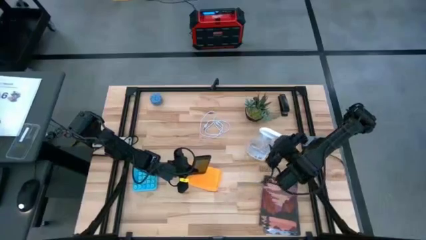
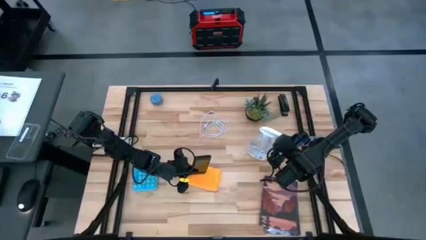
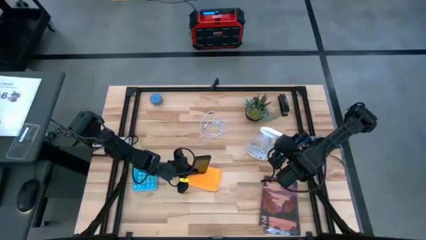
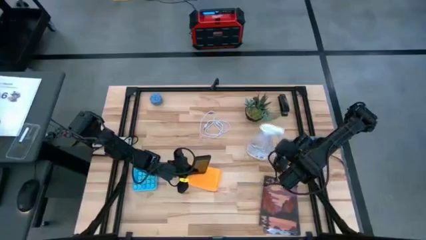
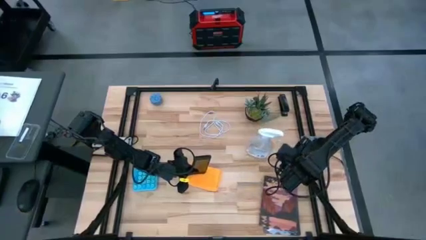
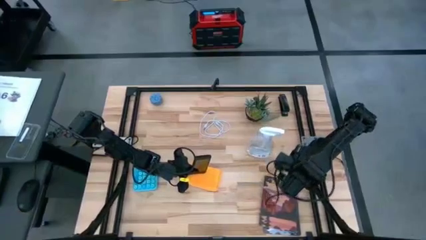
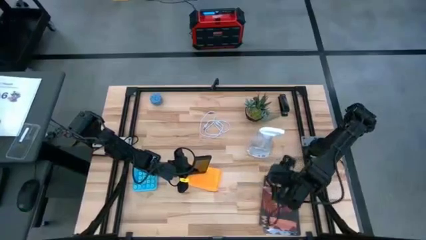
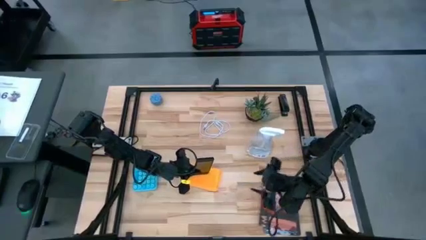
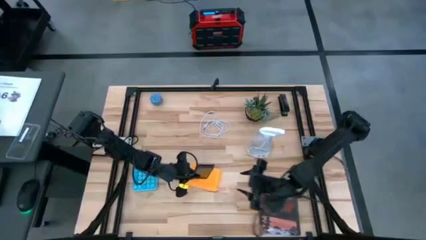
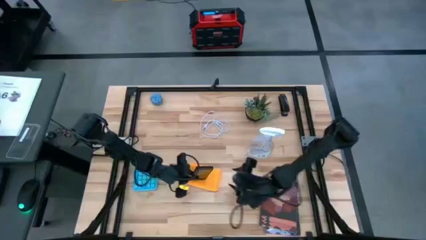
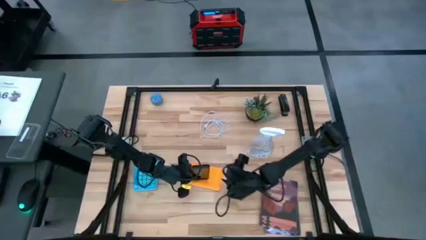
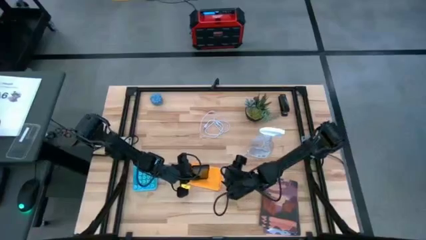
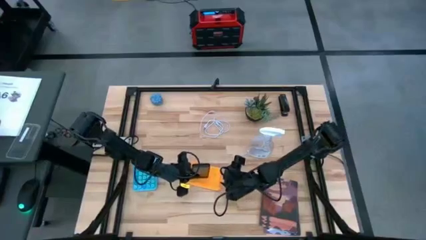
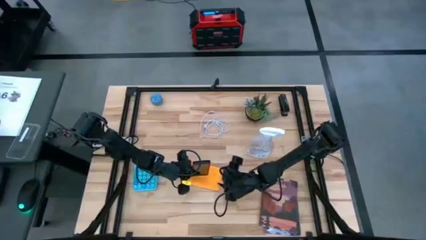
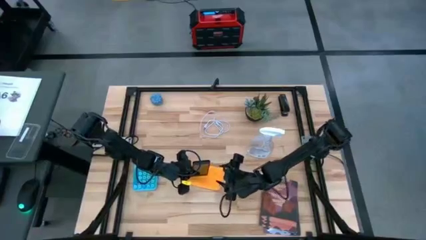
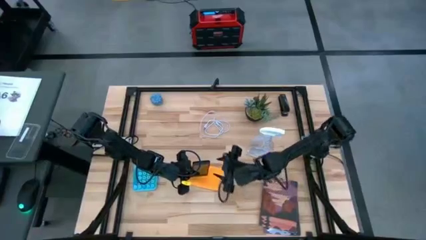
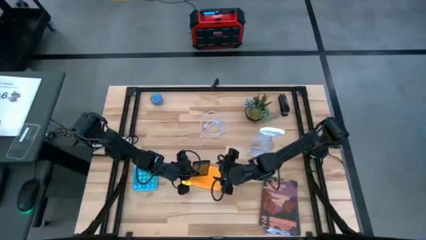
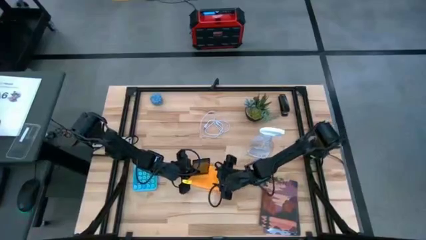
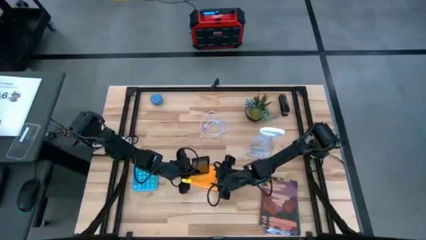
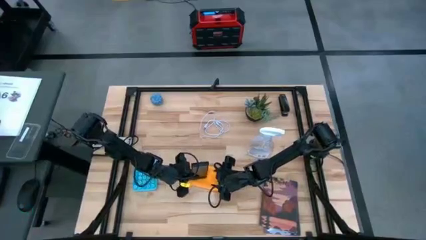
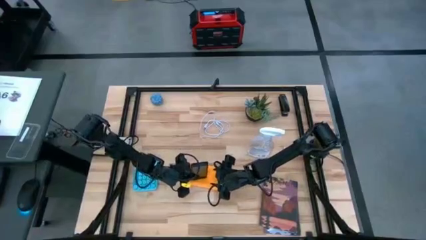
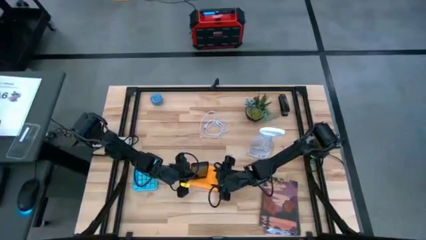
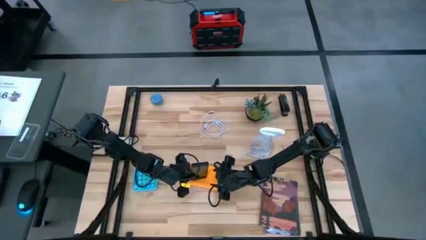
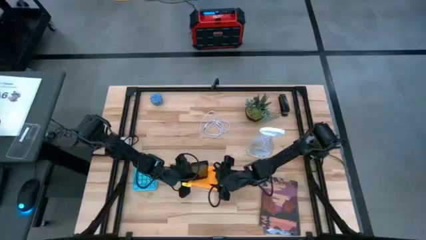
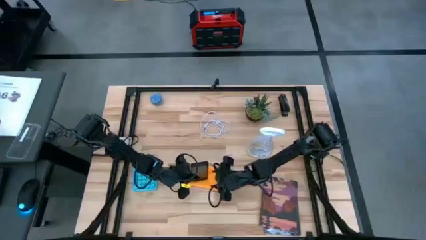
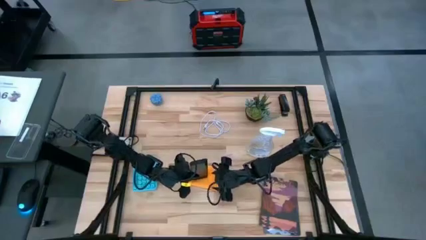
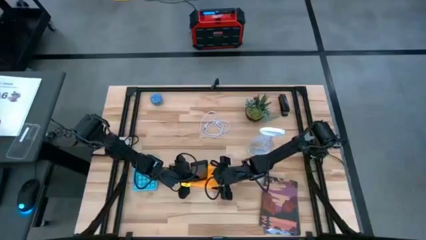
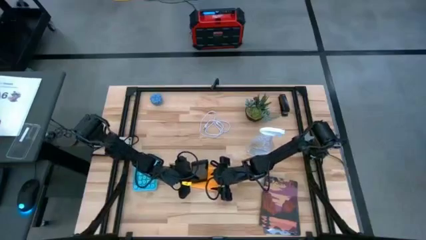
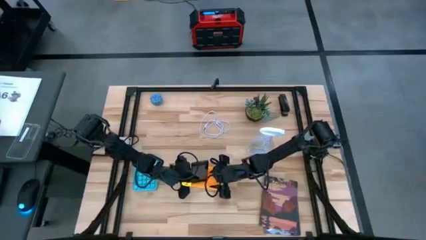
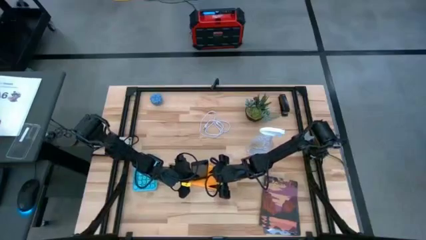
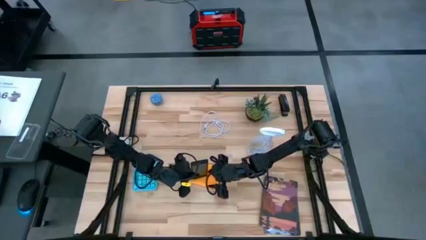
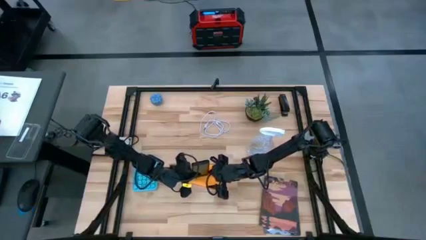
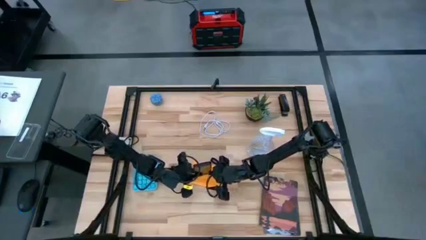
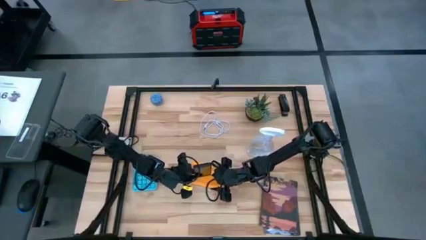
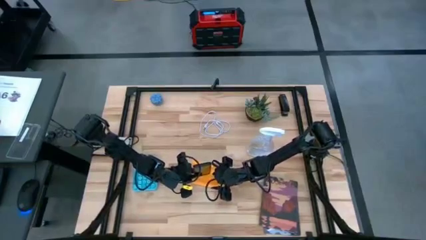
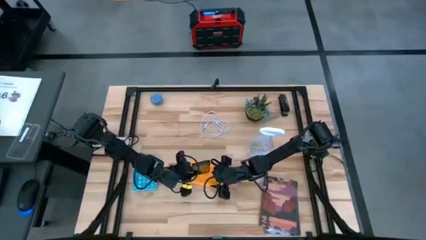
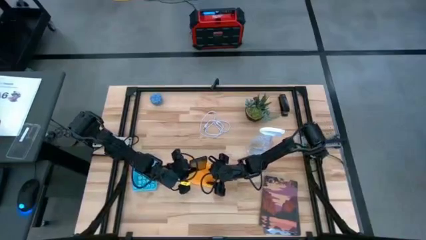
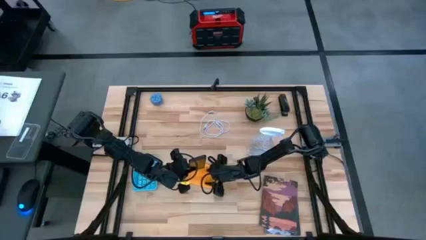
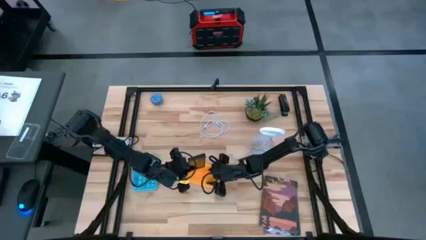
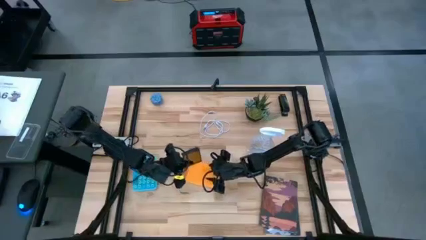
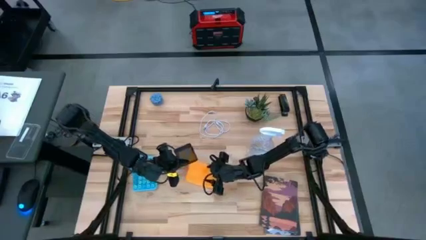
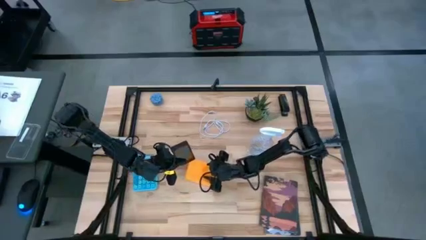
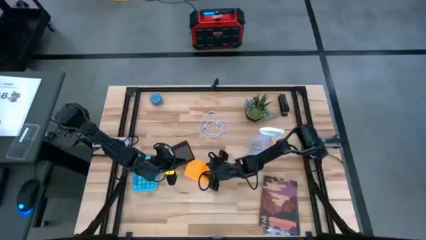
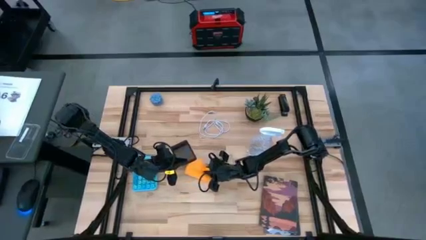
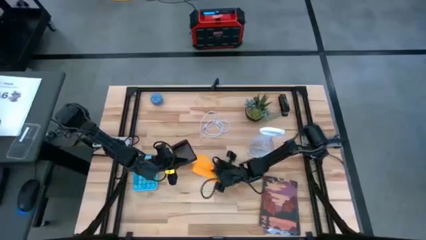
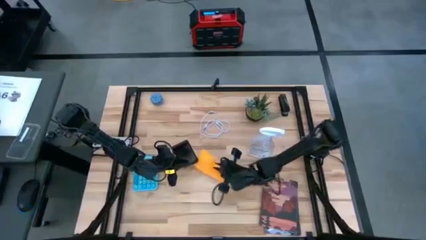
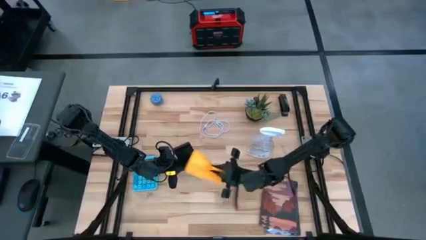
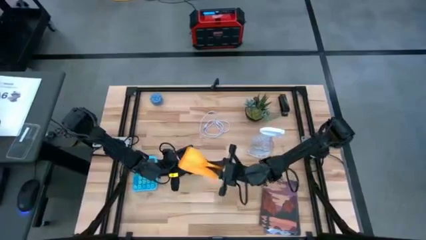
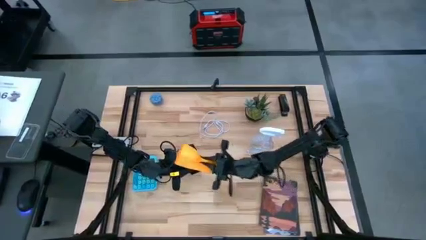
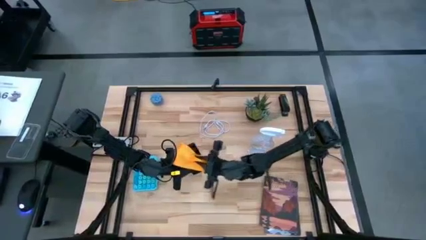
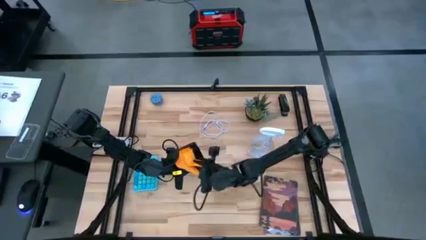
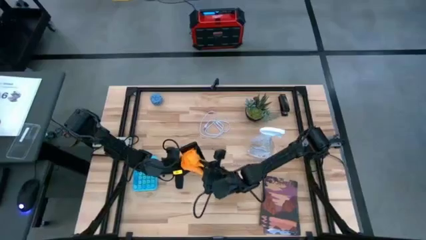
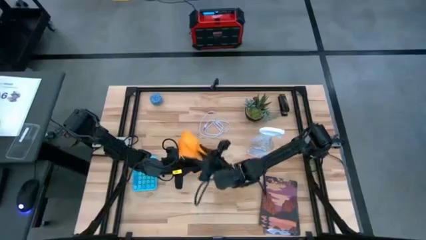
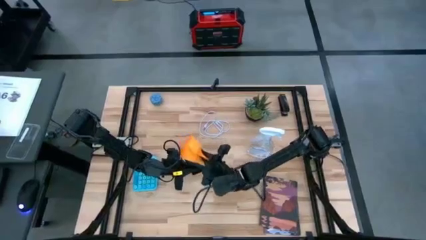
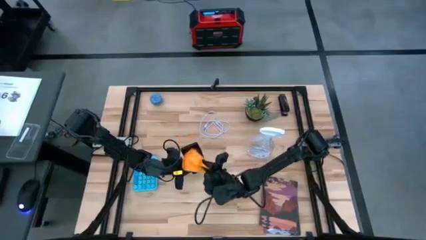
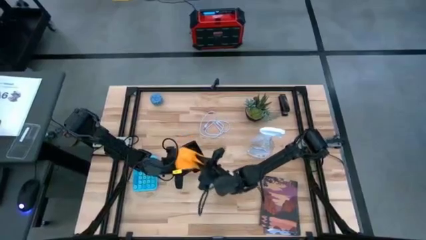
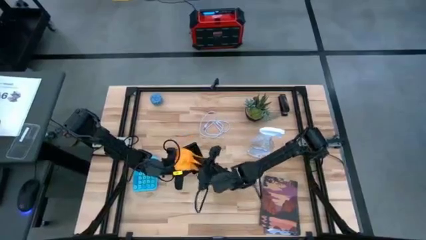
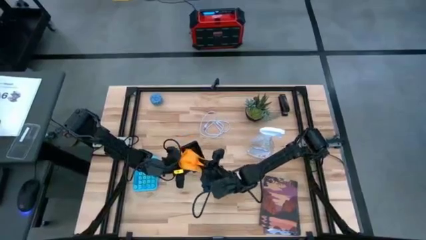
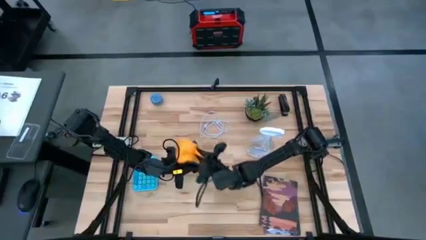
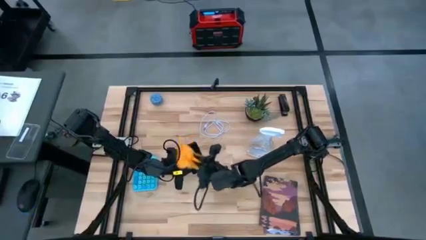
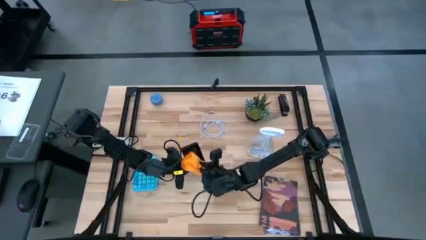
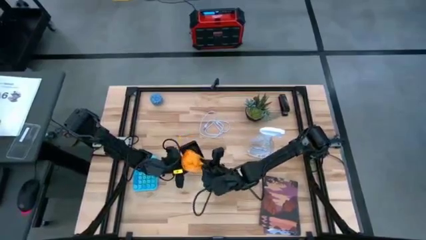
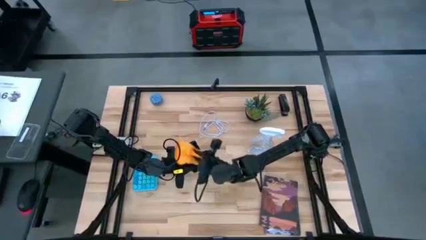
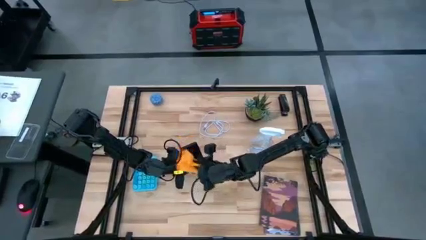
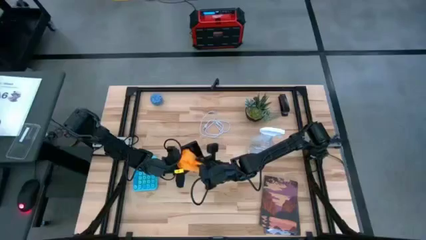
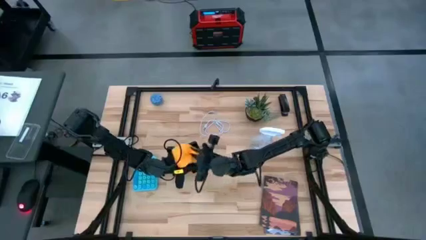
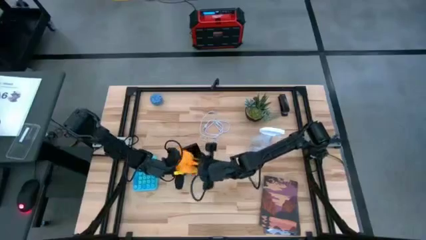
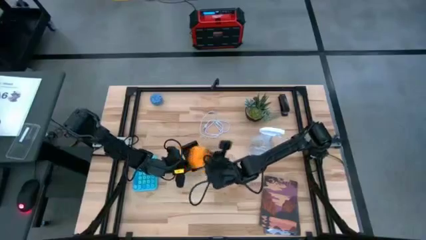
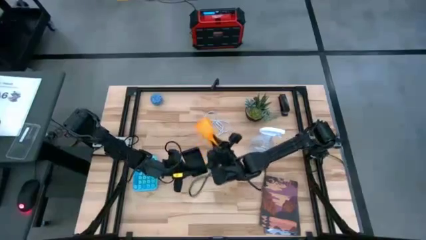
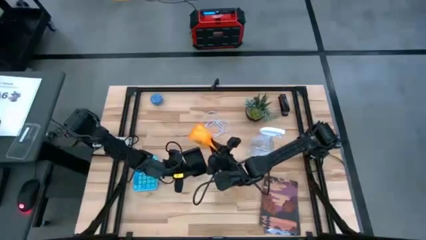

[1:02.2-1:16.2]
Task: Apply microfiber cloth
Wipe the black cellphone using microfiber cloth

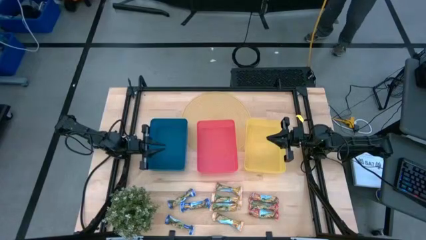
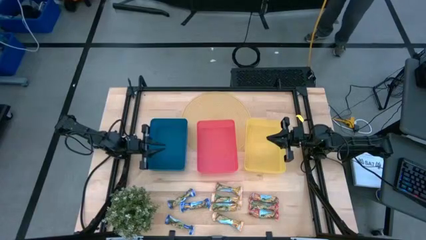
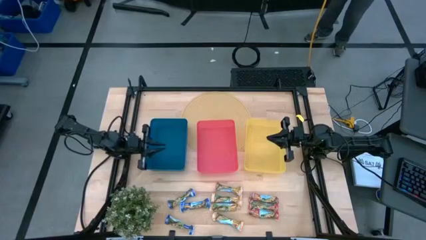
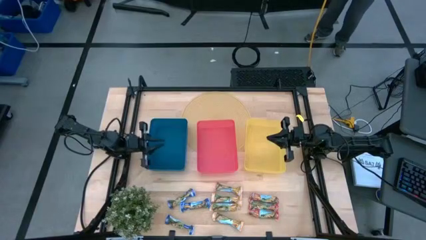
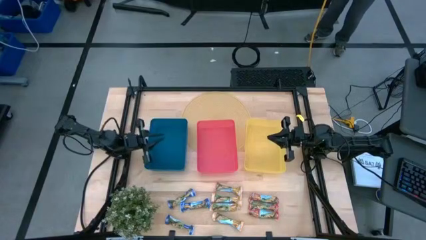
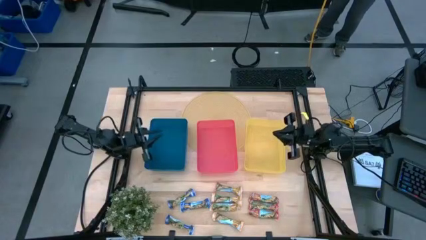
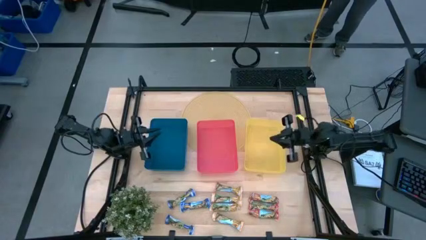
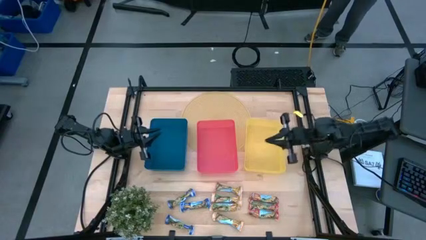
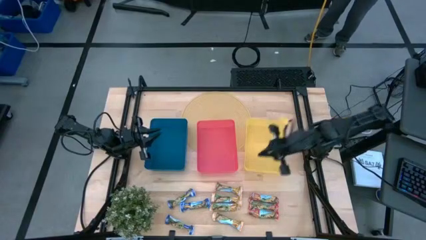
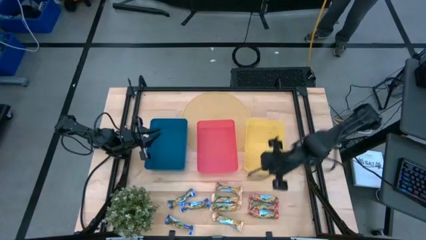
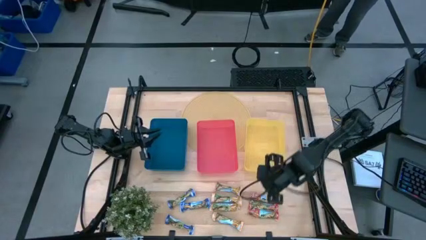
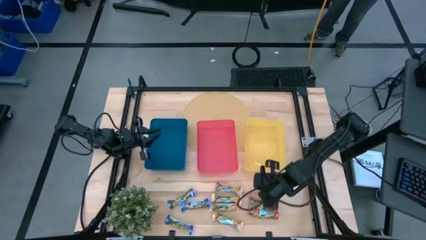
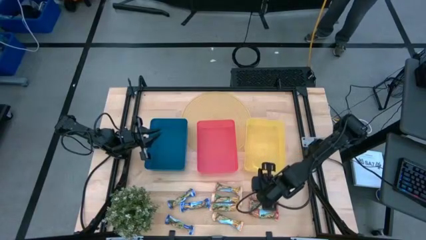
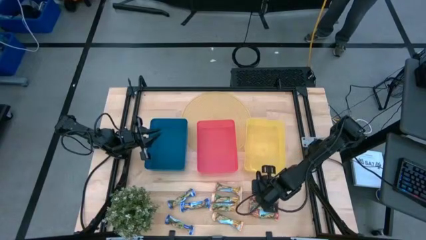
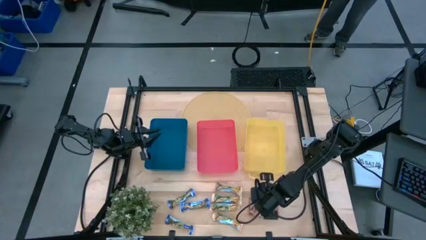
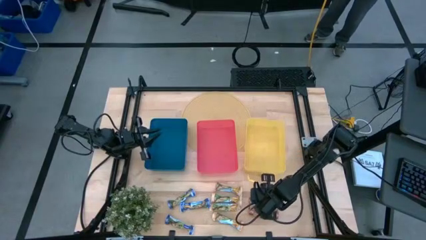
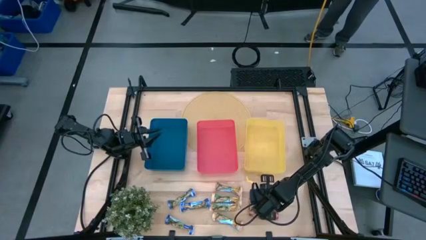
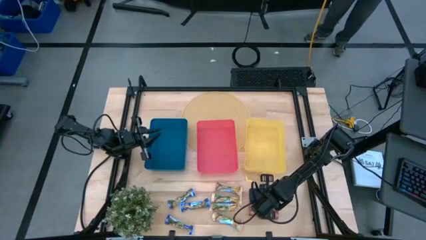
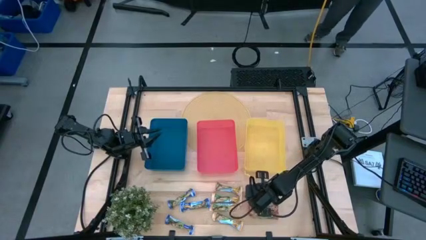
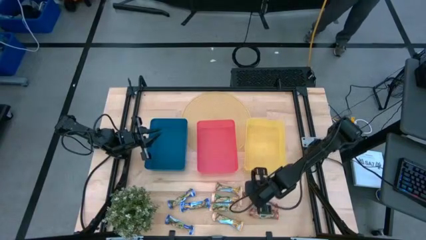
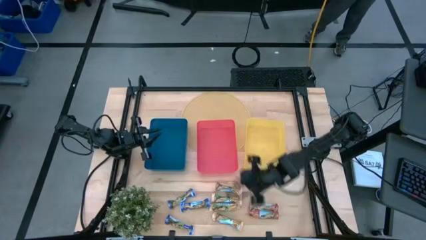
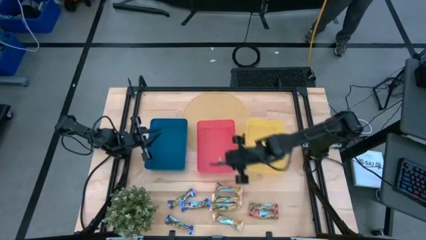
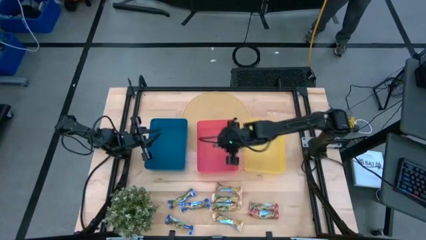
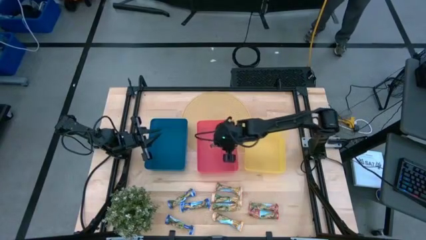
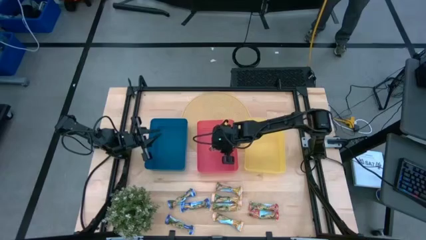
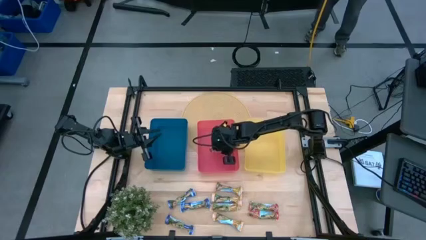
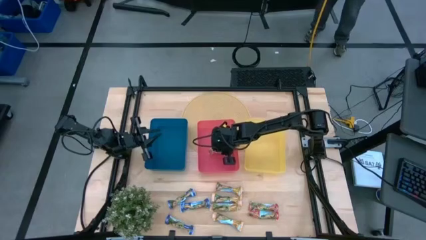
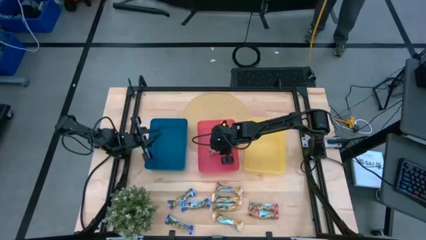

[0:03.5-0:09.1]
Task: Pick and place Granola Bars by type
Put the red granola bar into the red bin
